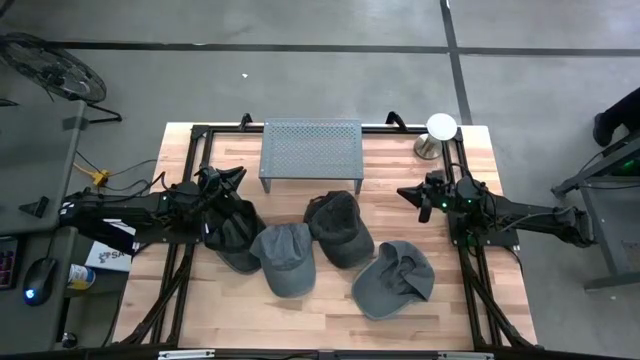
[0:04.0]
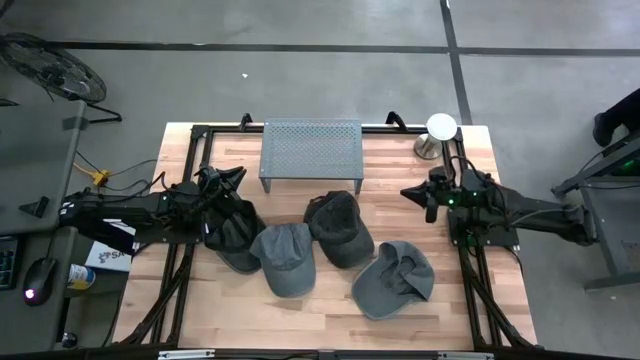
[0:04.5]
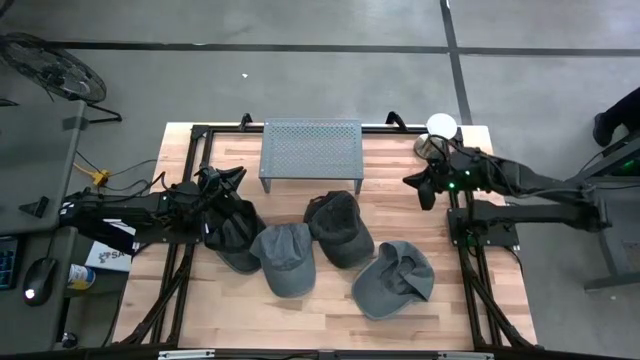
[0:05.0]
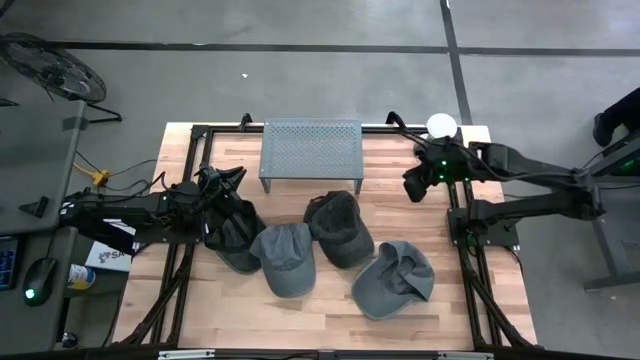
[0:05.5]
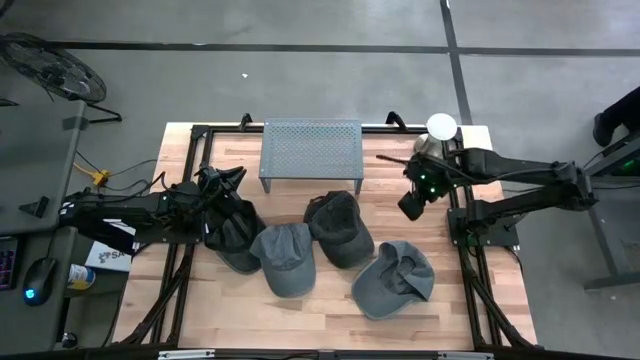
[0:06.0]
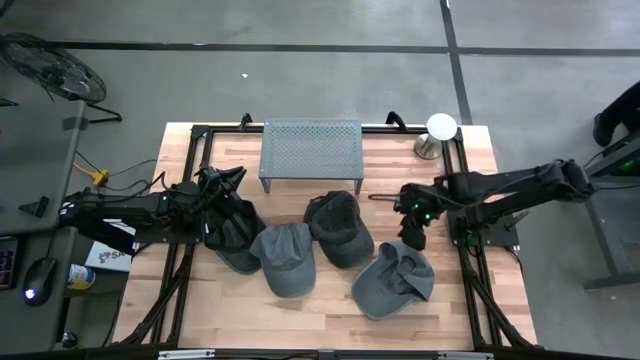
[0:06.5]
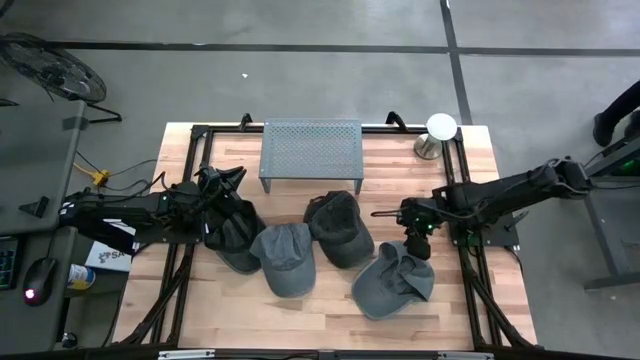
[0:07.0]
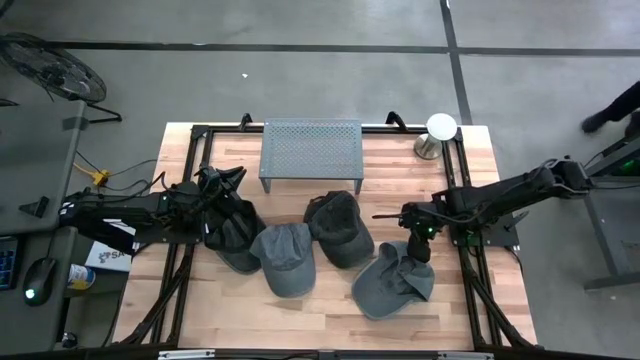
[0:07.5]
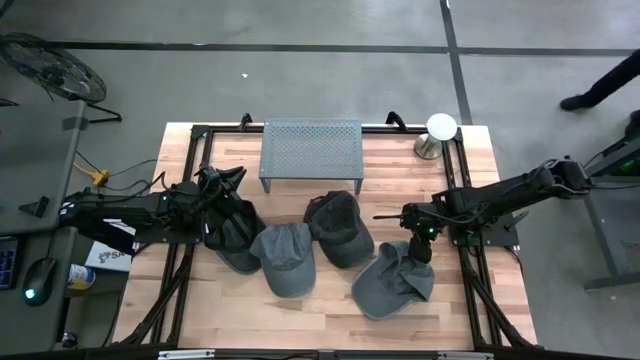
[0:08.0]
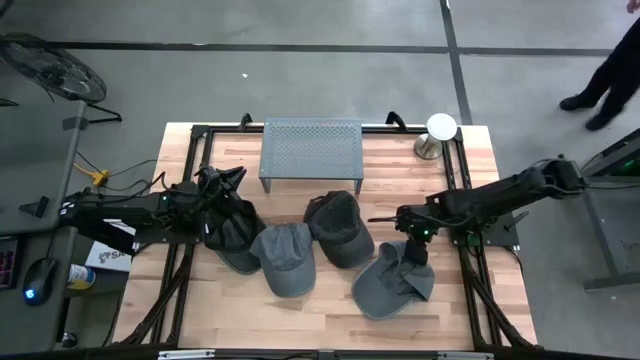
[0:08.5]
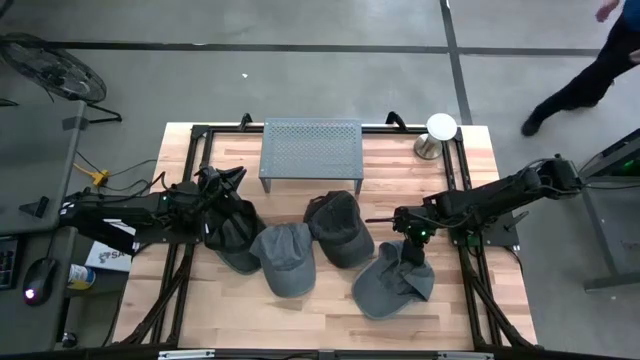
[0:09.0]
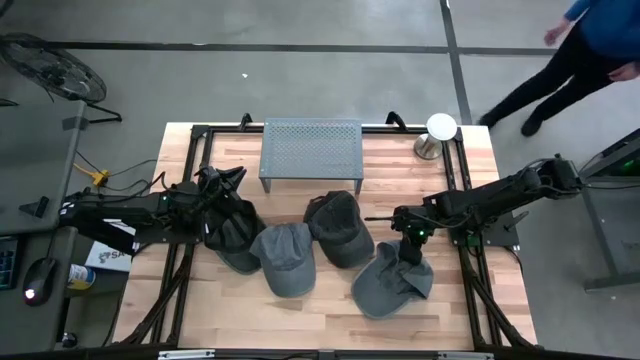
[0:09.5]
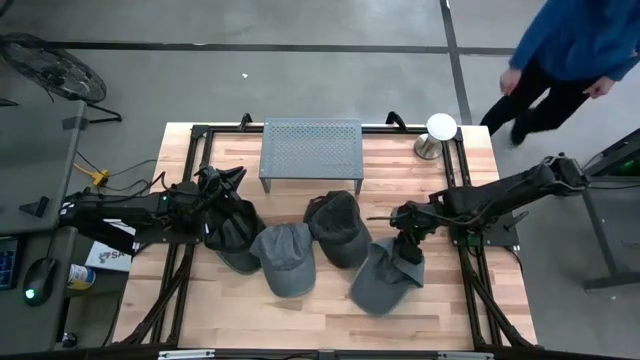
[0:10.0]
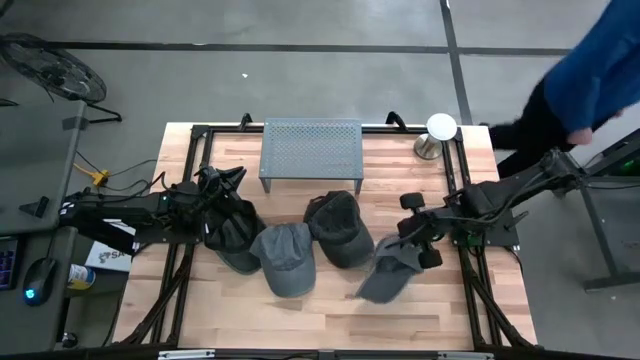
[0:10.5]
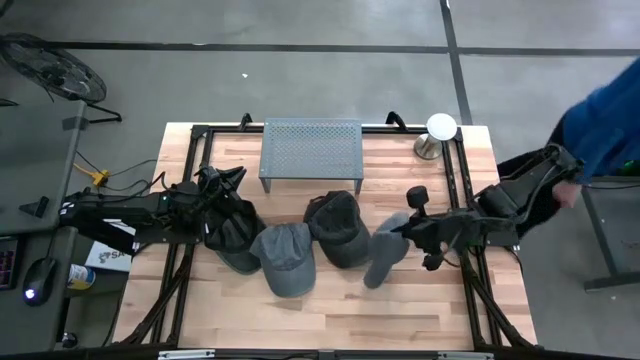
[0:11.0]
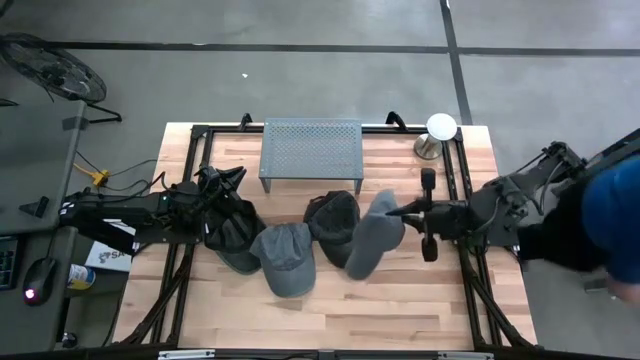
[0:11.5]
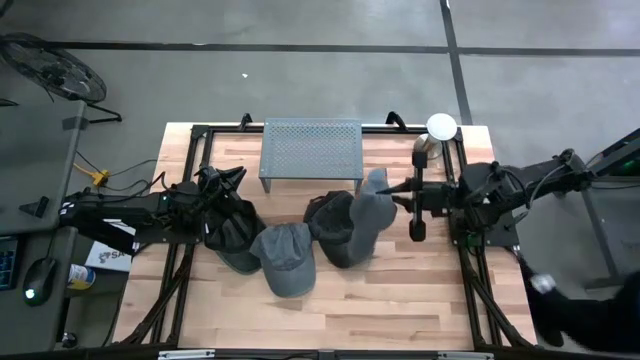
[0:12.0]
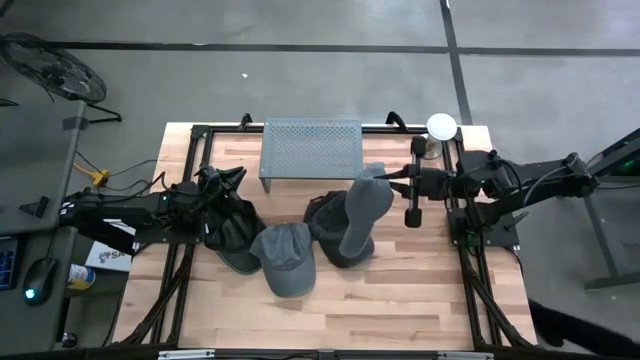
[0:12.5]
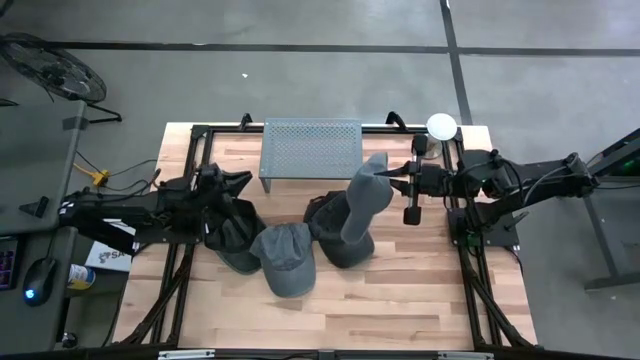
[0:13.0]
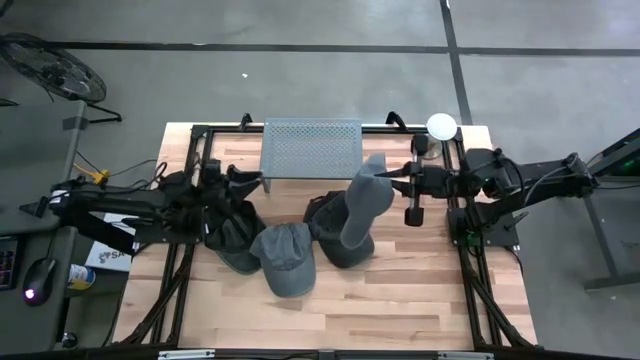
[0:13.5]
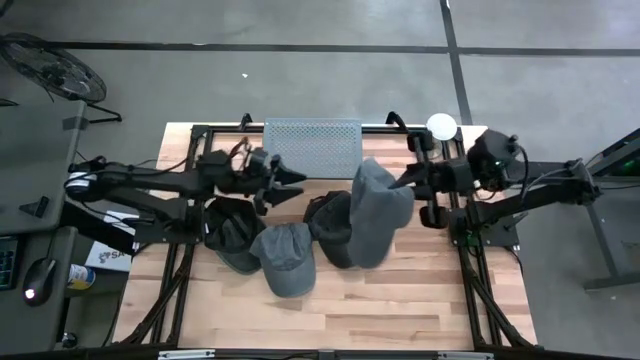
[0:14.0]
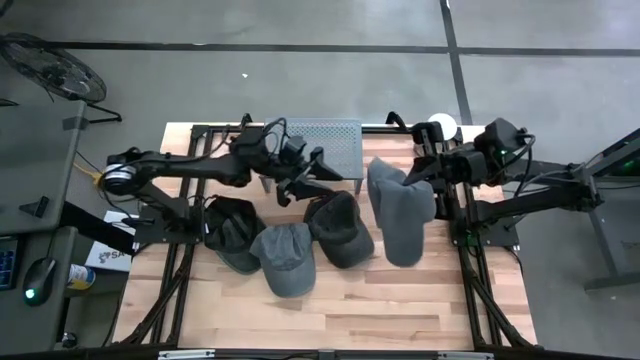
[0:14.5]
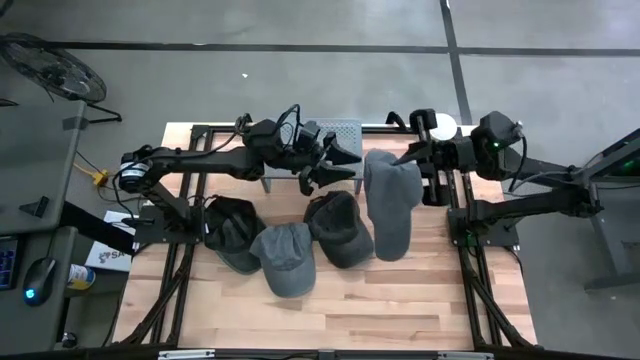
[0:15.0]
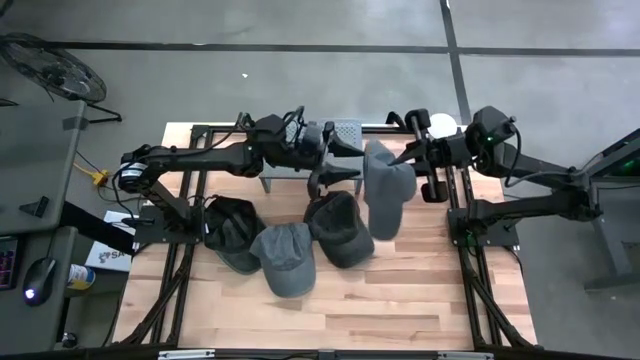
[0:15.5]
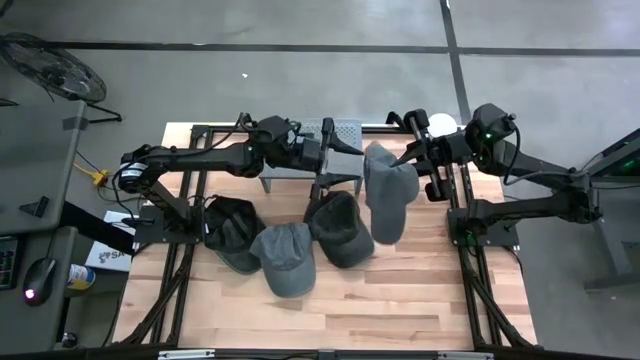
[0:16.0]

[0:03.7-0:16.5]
Task: Pick & Place hat
Put the right gray cap on the shelf

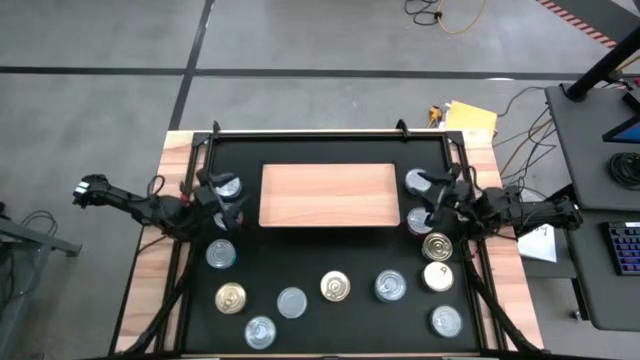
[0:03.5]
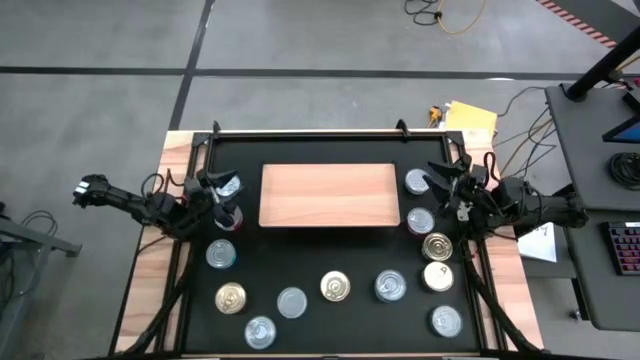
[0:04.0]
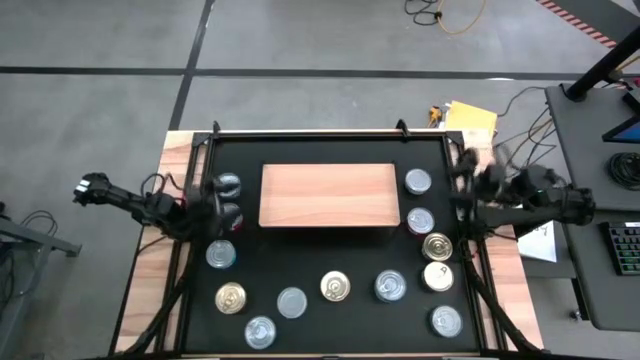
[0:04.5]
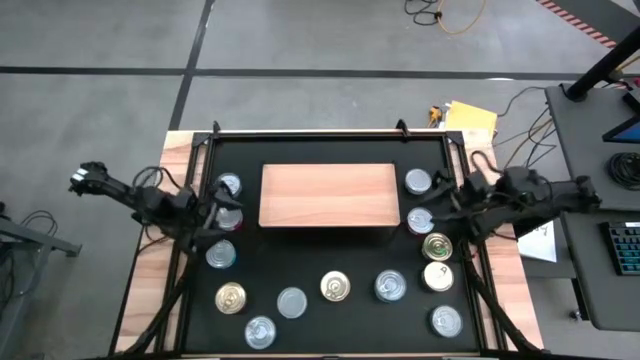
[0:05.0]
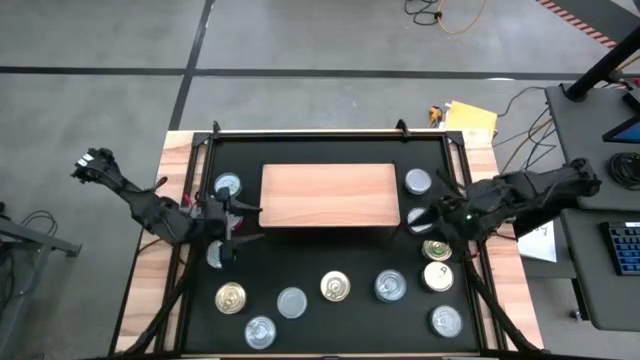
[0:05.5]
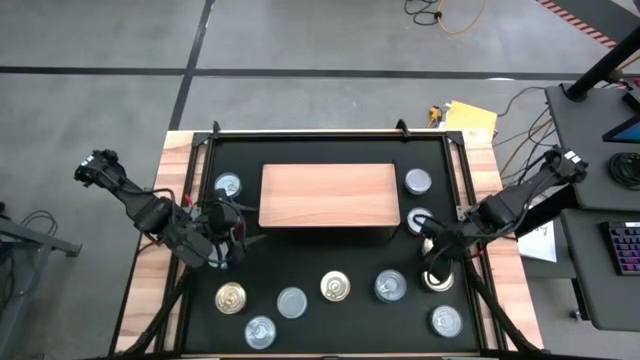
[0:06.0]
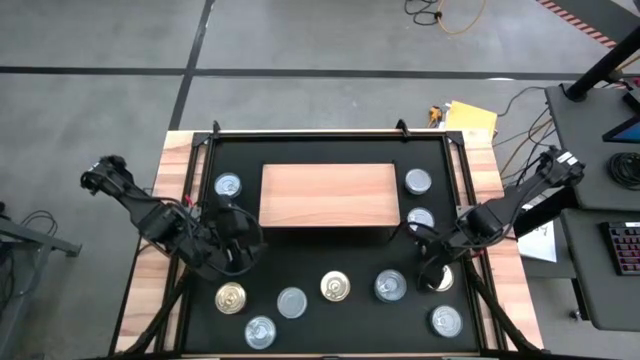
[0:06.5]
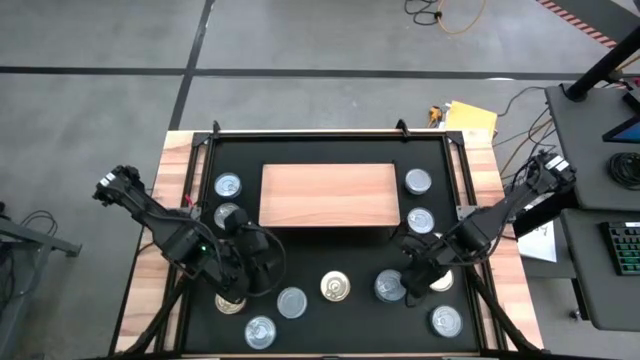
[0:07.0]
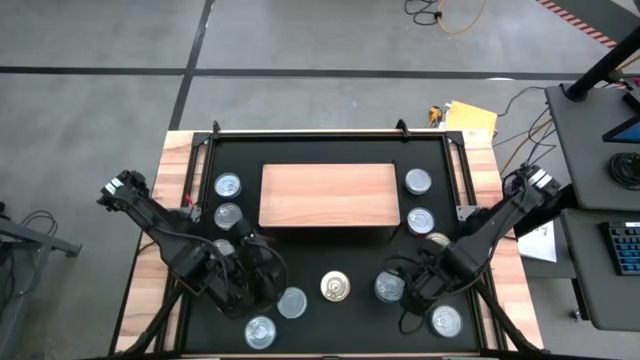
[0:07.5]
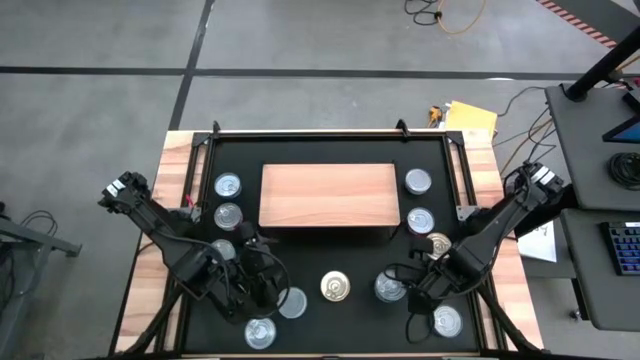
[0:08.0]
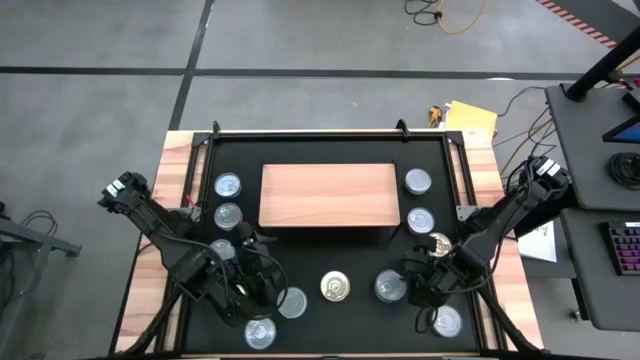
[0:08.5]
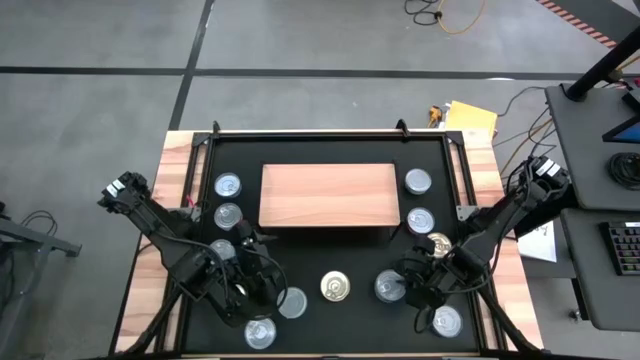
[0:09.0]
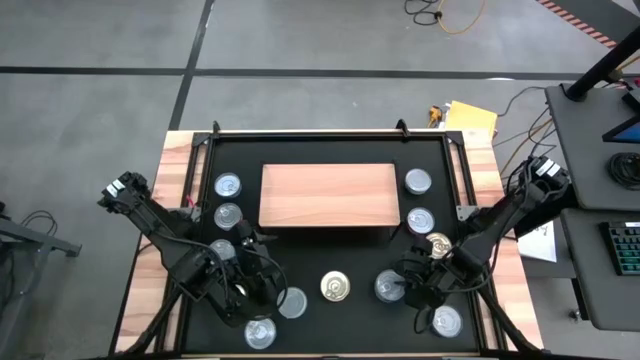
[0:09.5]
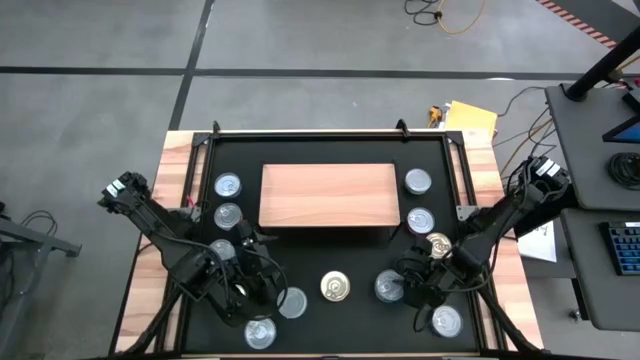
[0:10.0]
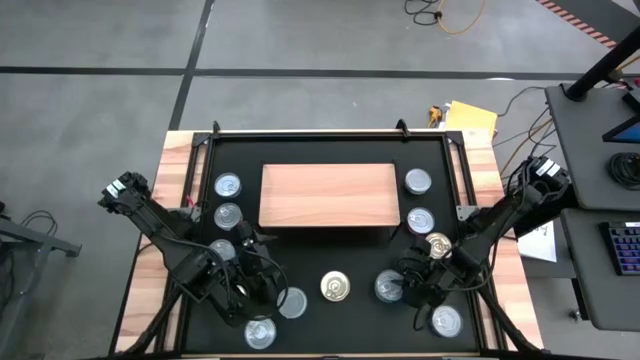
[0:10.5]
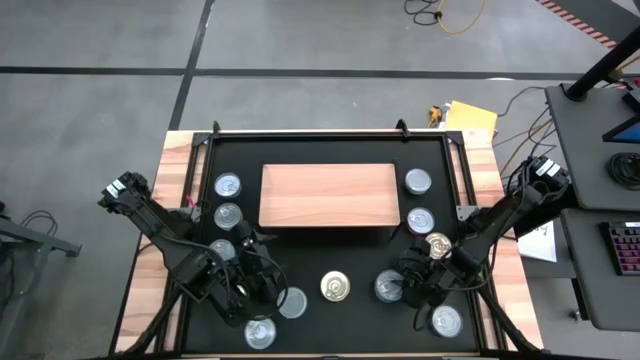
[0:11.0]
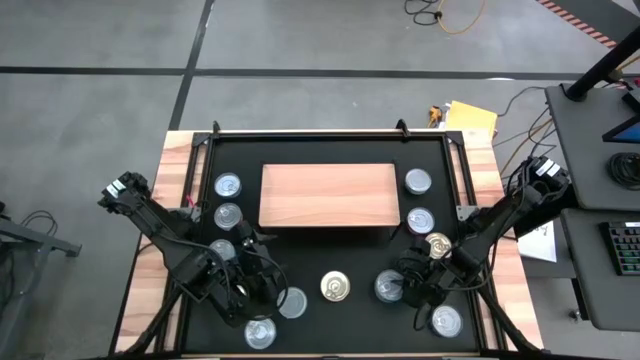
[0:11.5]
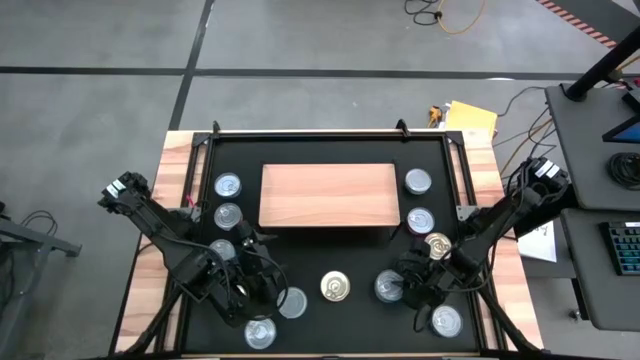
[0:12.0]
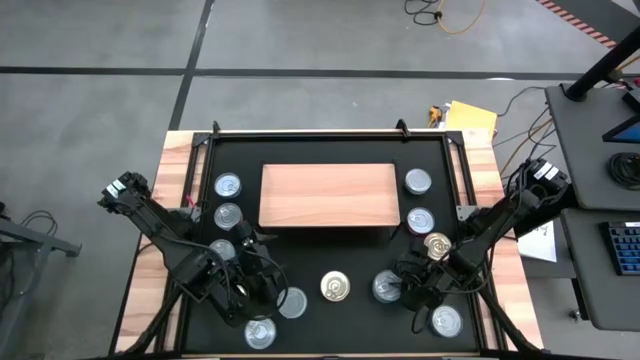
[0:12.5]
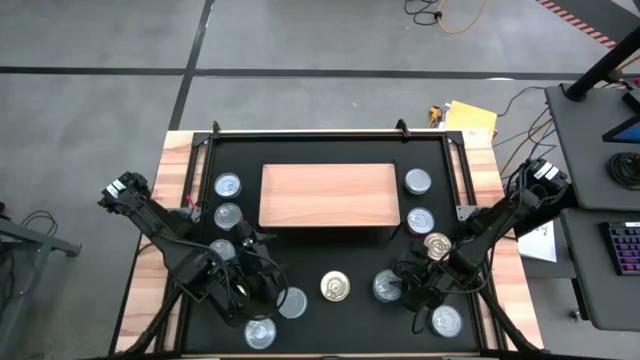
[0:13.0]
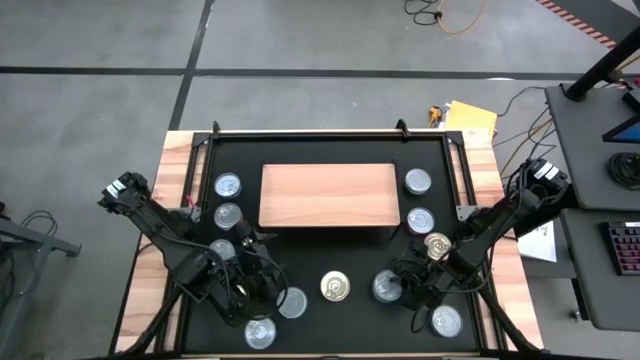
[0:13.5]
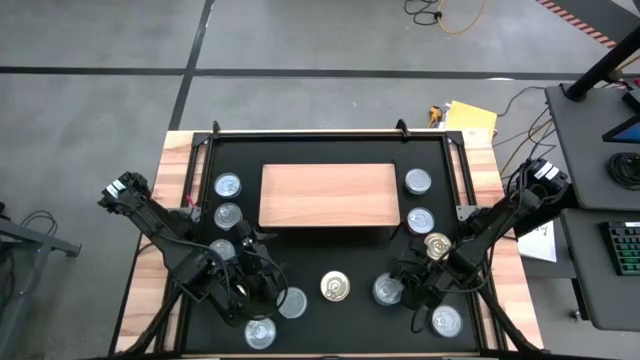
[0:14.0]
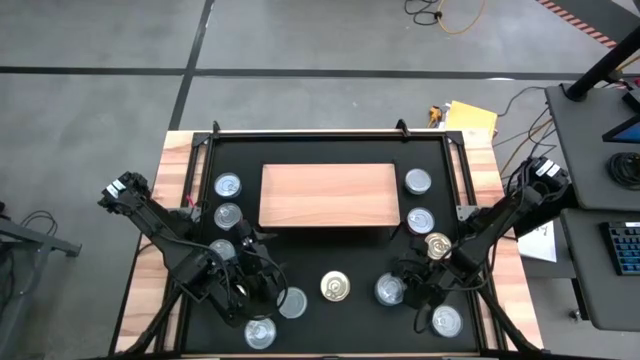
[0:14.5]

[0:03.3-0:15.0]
Task: Stack canned seafood by type on shelf
Put the light green tuna can on the shelf
